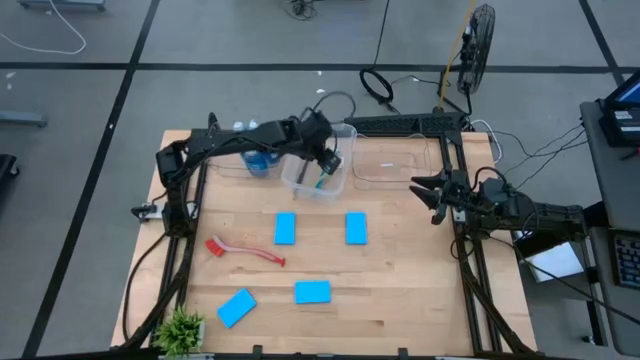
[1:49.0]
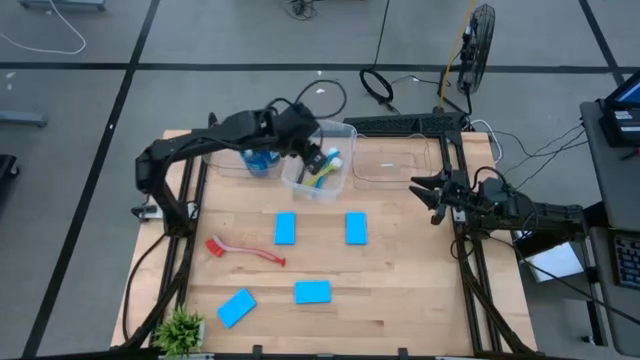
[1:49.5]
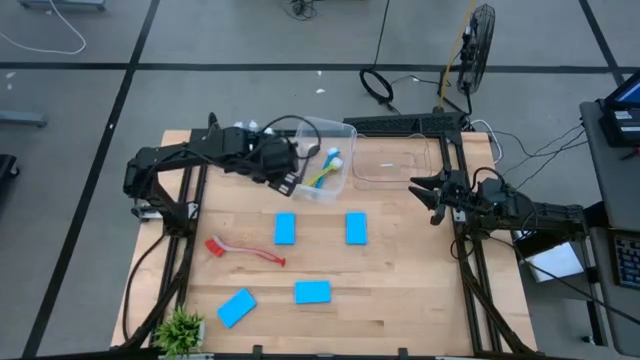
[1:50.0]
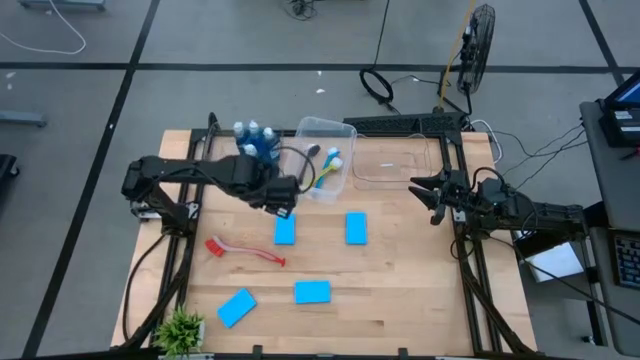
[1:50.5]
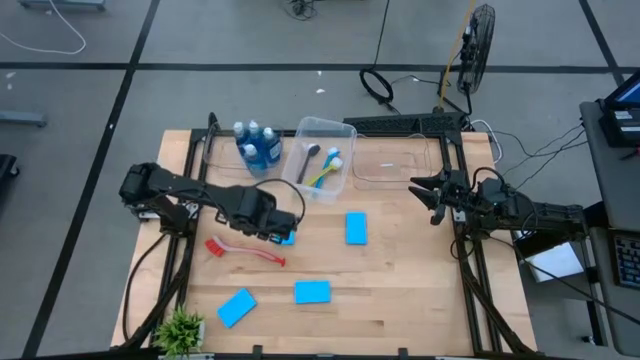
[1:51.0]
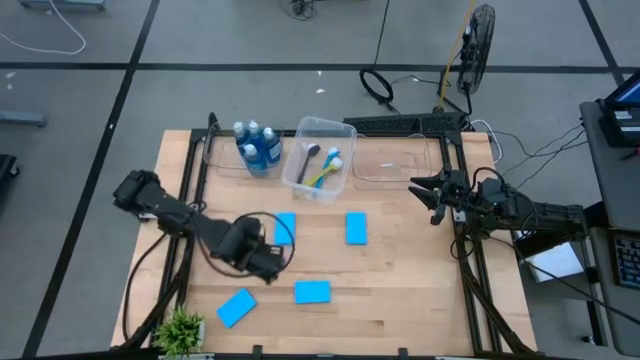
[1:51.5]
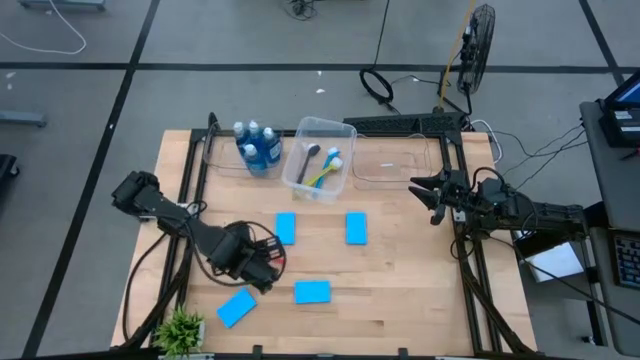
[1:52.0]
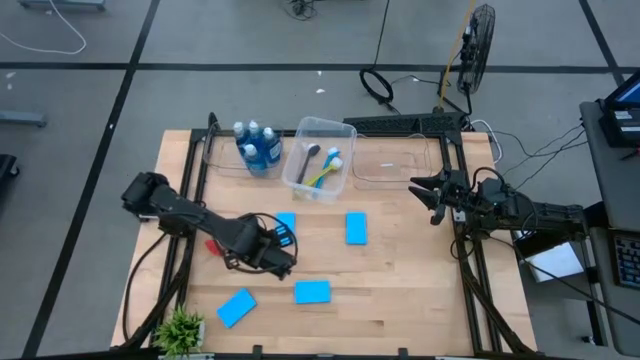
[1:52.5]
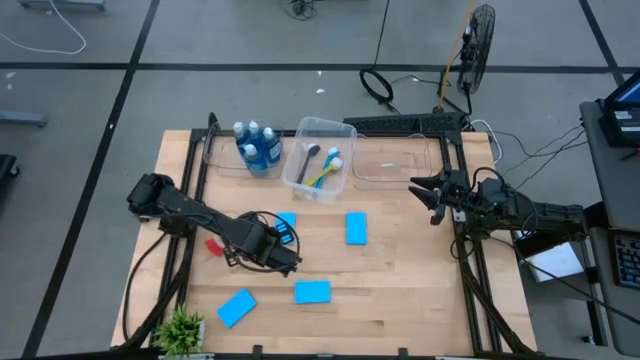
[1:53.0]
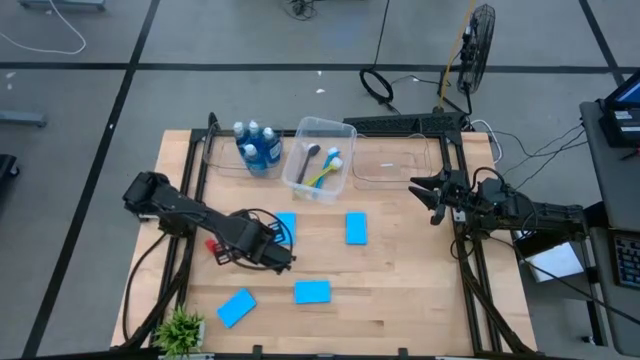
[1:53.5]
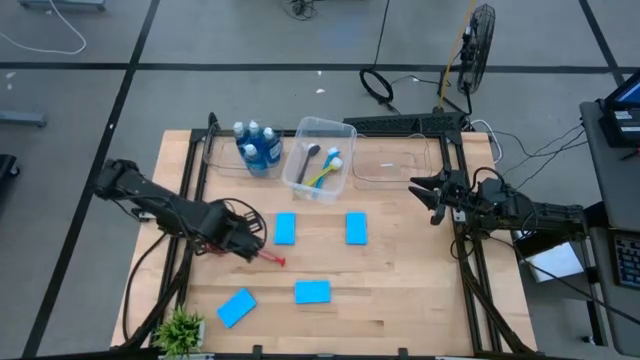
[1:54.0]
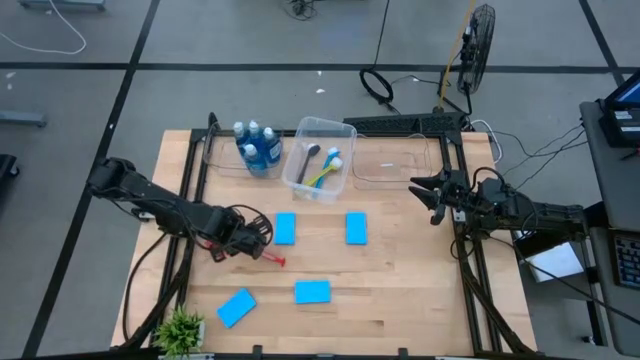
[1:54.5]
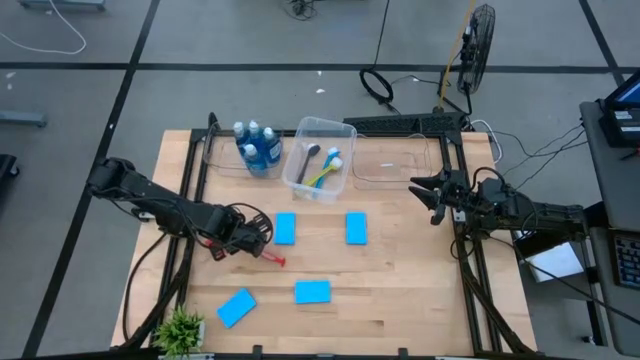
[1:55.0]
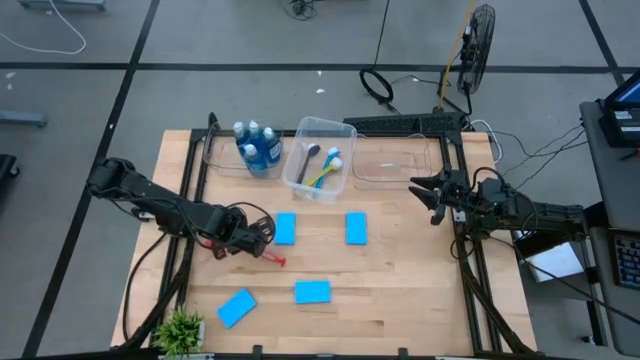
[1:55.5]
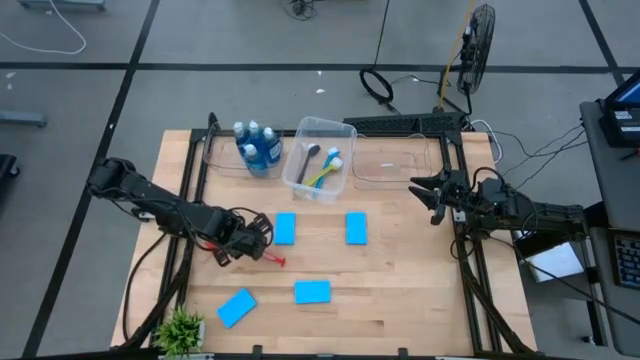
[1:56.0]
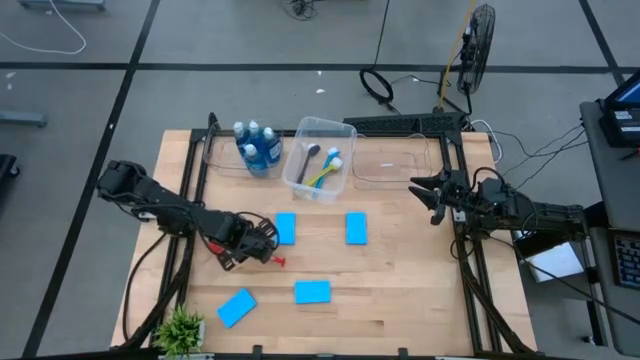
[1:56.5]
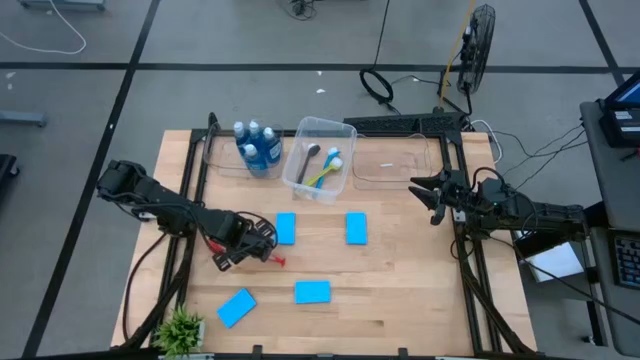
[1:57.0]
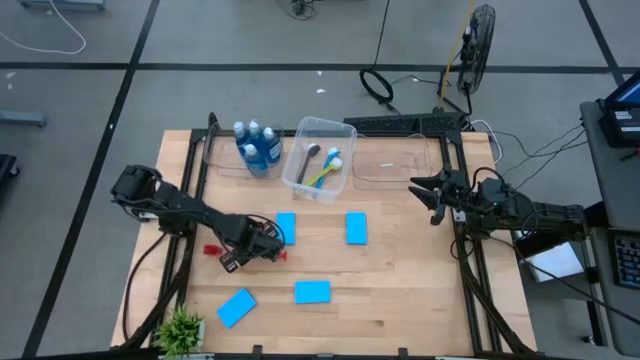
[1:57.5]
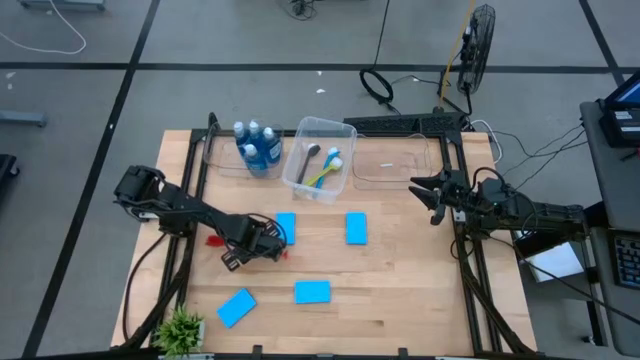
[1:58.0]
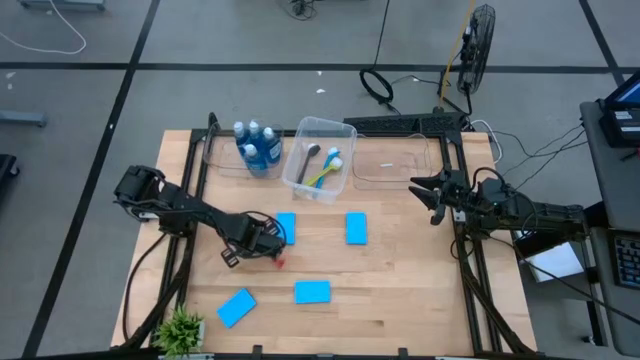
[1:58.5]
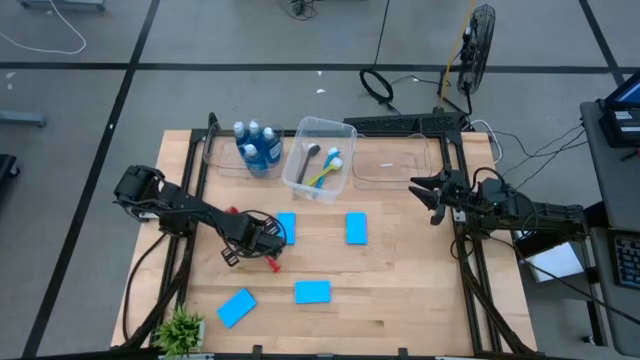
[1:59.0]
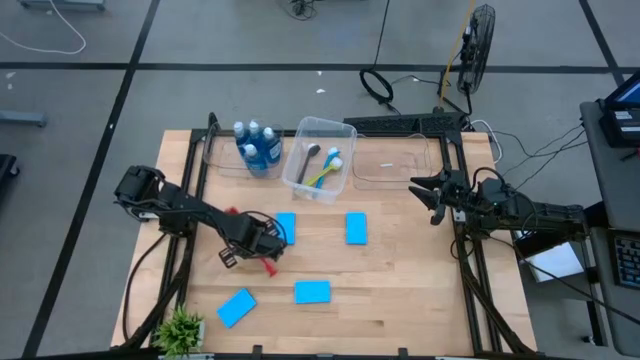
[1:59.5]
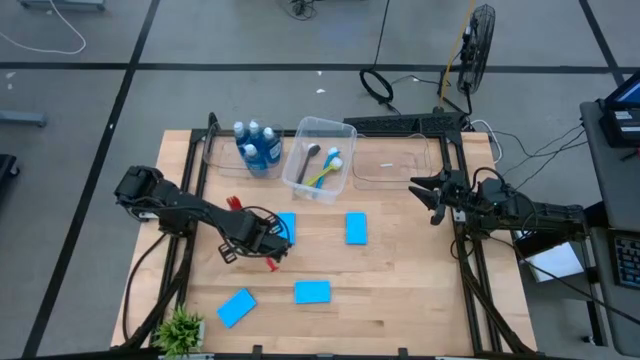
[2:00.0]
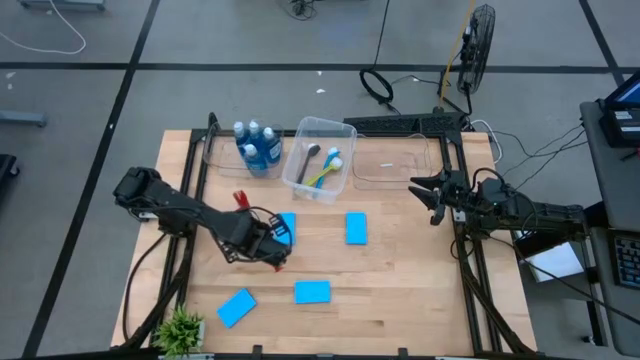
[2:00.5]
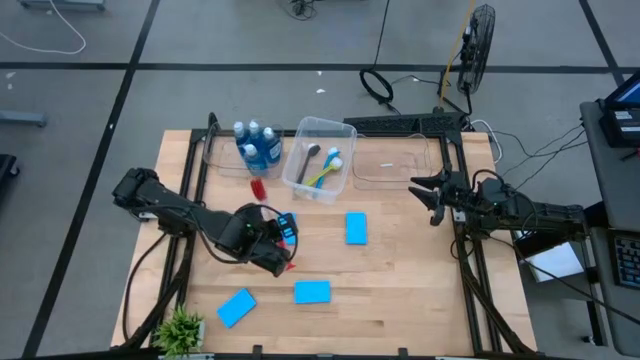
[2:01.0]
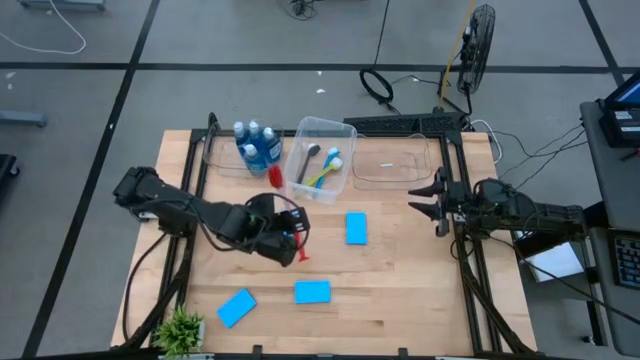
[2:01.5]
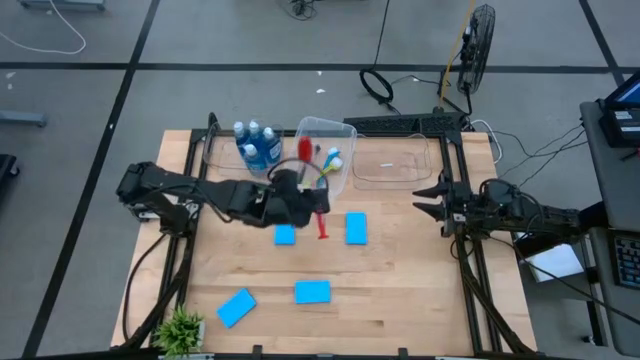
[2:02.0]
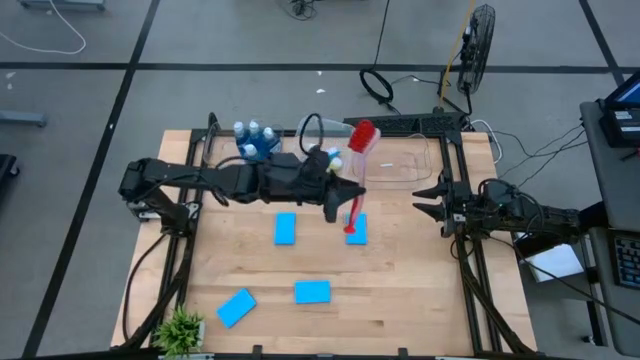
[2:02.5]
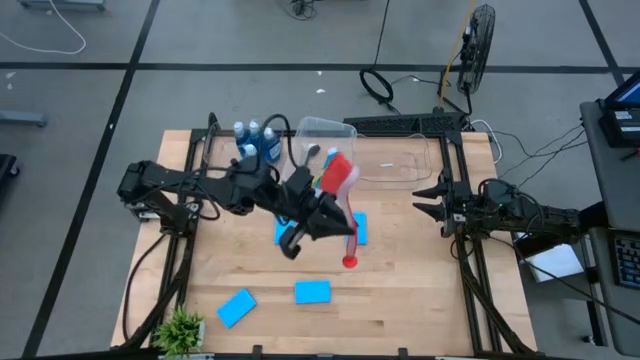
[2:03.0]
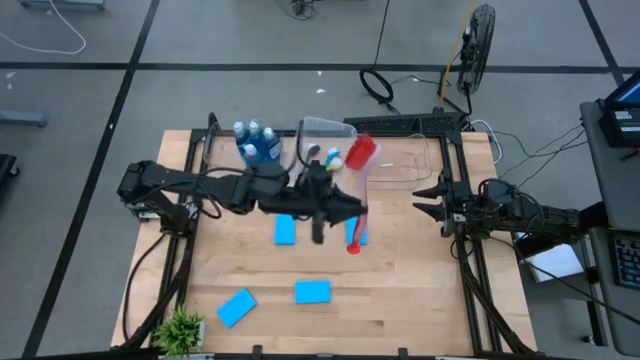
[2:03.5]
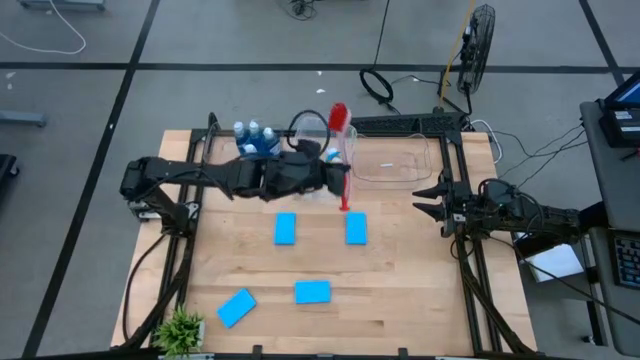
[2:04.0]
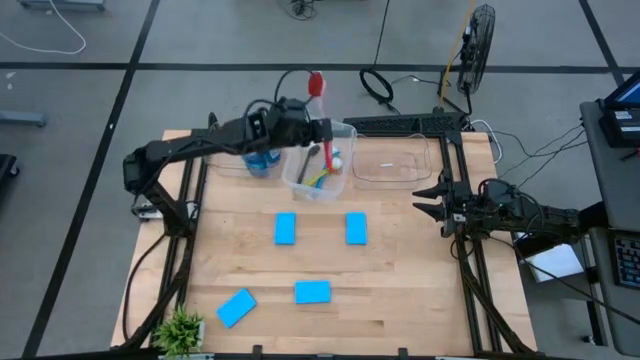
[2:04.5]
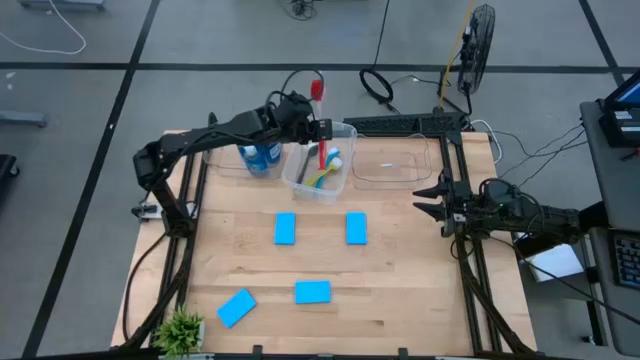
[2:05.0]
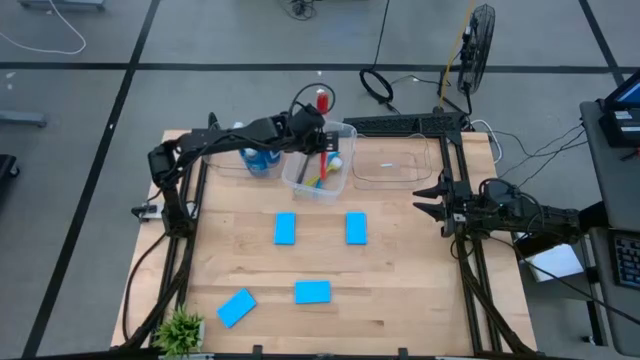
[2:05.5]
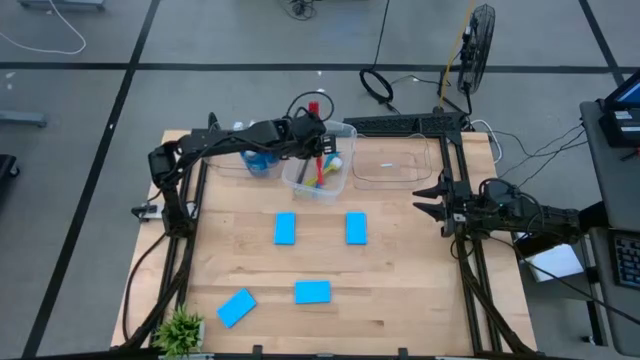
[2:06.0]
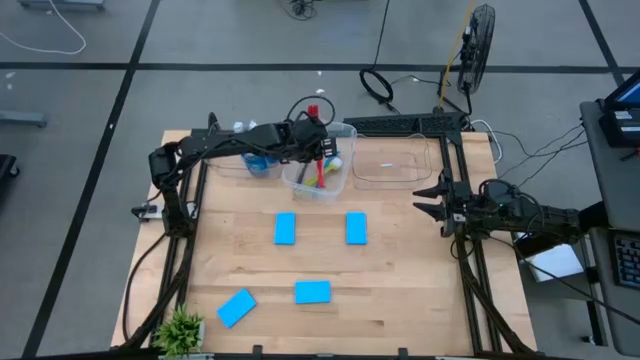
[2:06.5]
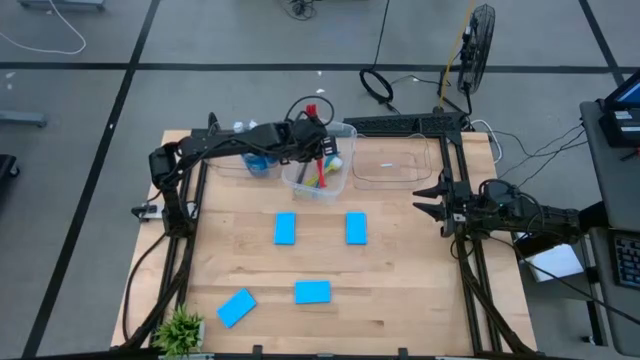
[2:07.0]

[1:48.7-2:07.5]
Task: Pick & Place Kitchen Sink Supplies
Put the red dish brush into the transparent container

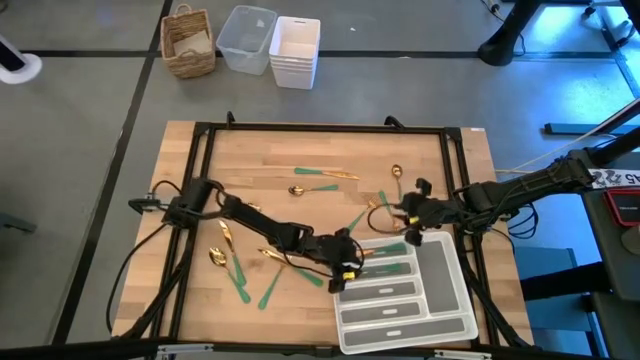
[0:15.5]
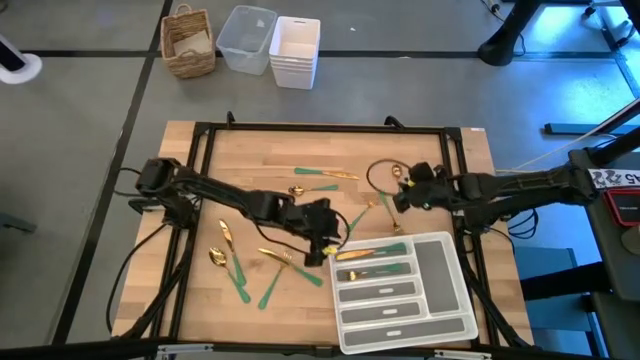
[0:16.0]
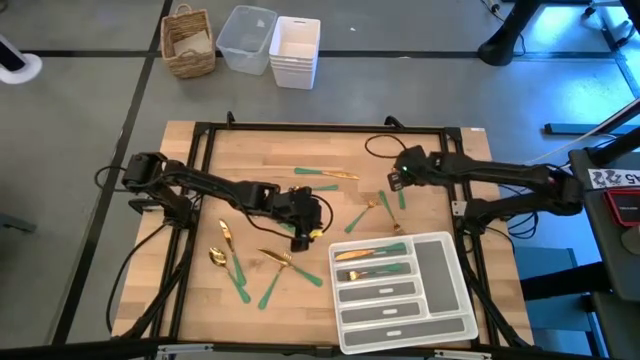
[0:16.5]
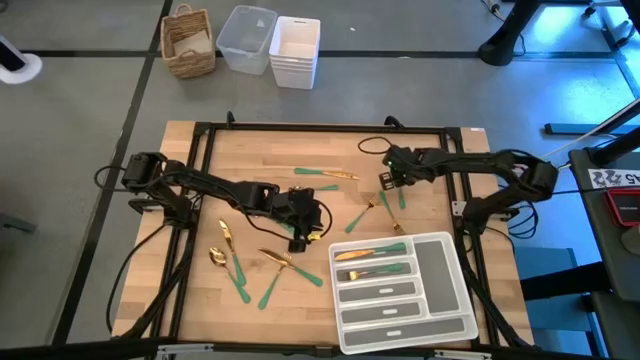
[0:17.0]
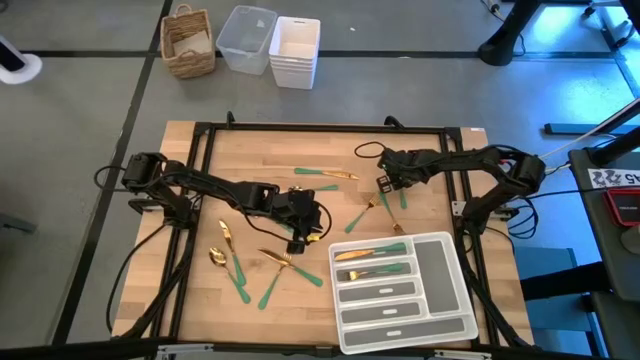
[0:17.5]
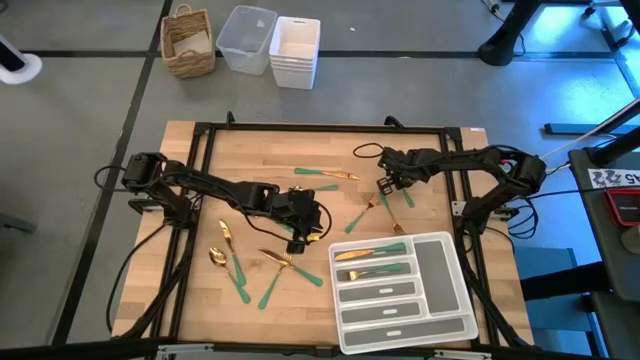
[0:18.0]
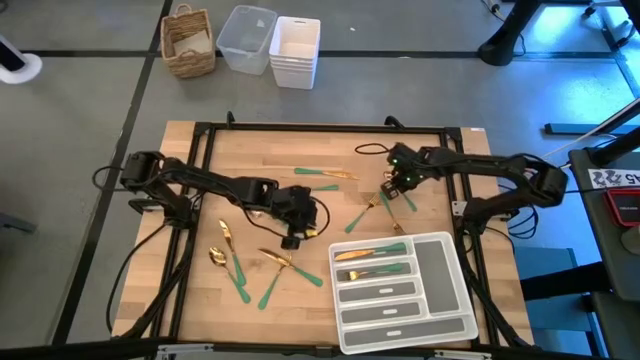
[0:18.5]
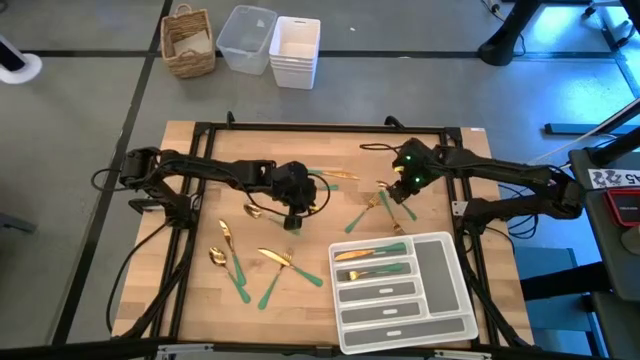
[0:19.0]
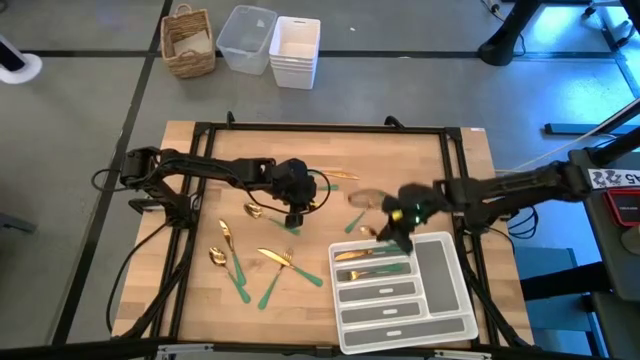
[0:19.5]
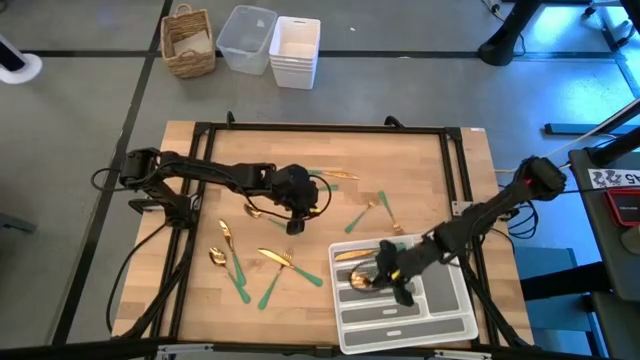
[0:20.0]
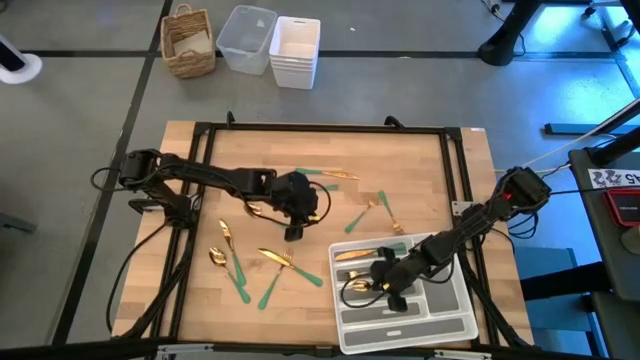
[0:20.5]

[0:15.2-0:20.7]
Task: Sort silverware
Put the top right green spoon into the silverware tray
